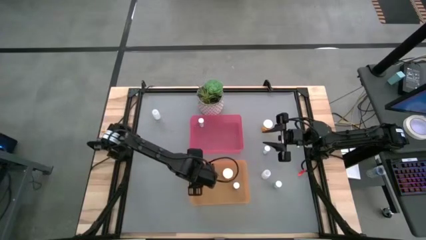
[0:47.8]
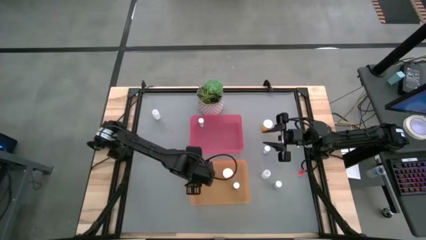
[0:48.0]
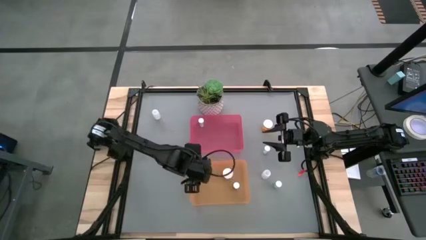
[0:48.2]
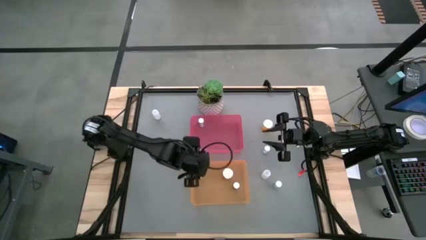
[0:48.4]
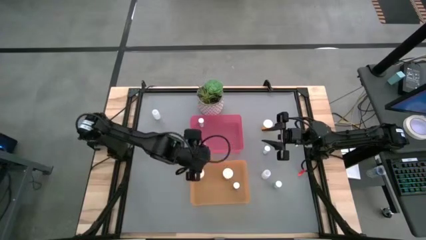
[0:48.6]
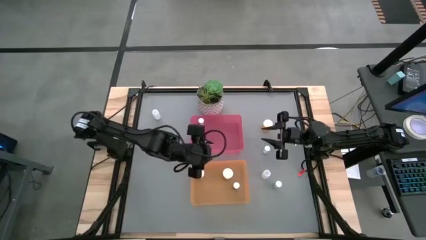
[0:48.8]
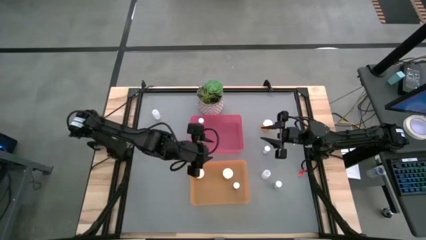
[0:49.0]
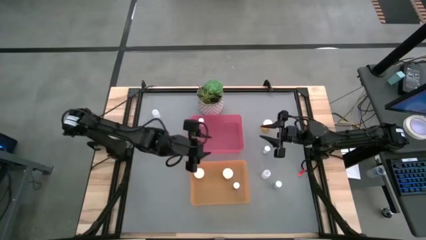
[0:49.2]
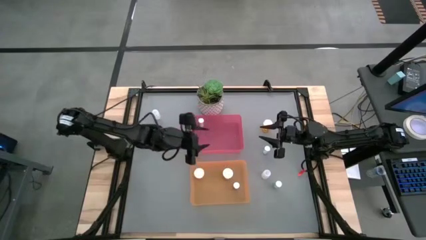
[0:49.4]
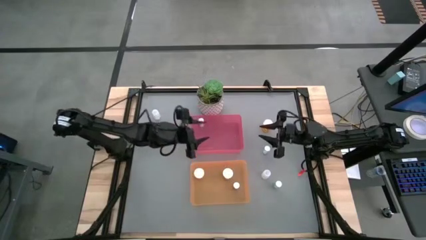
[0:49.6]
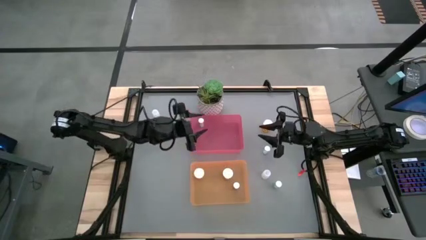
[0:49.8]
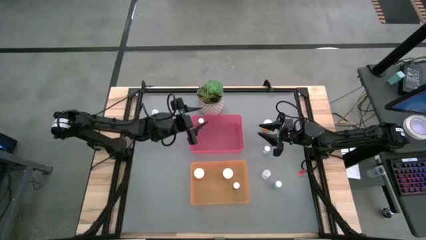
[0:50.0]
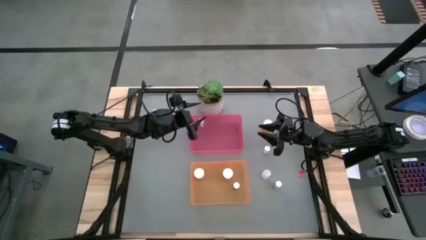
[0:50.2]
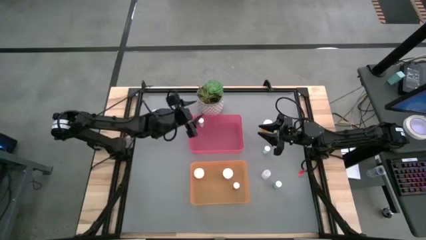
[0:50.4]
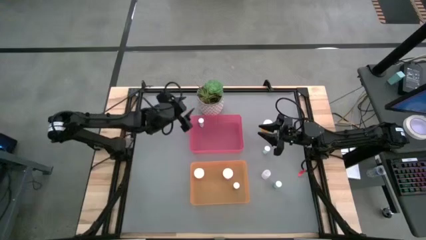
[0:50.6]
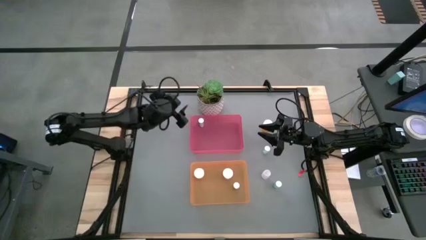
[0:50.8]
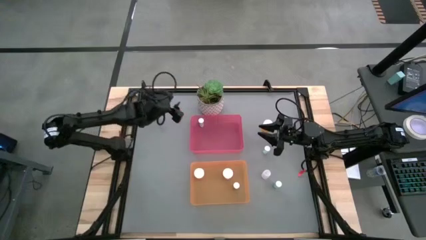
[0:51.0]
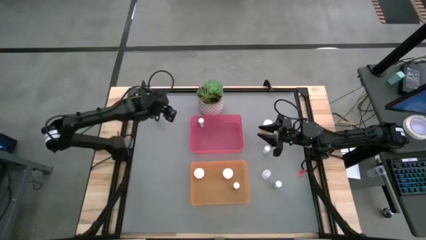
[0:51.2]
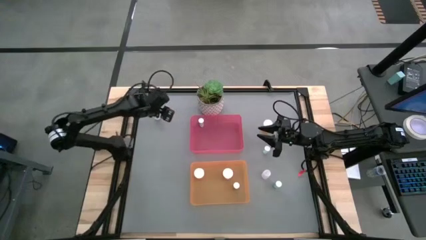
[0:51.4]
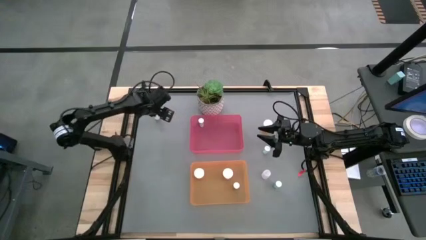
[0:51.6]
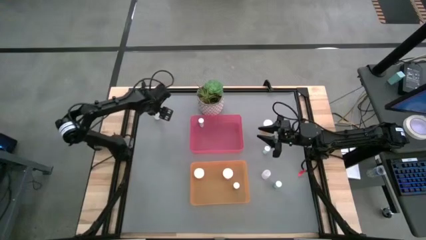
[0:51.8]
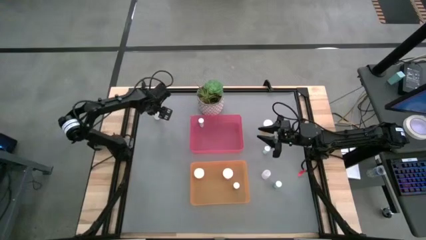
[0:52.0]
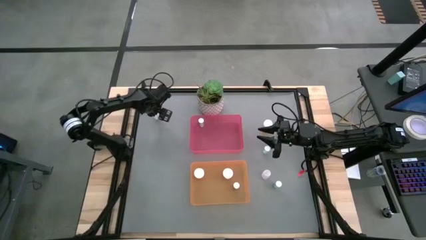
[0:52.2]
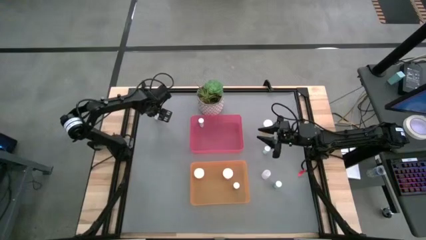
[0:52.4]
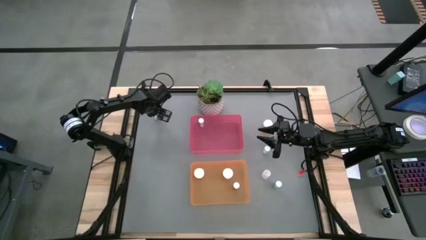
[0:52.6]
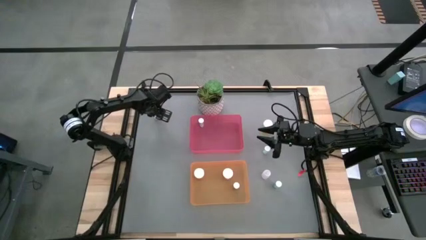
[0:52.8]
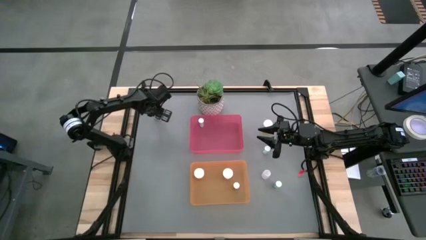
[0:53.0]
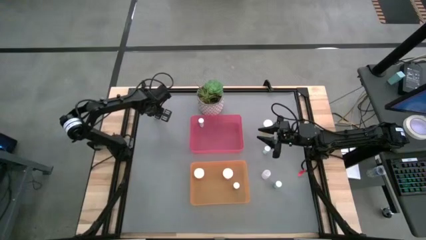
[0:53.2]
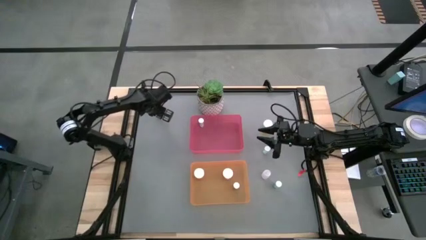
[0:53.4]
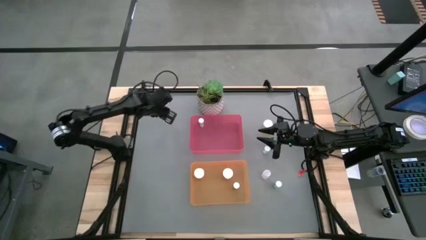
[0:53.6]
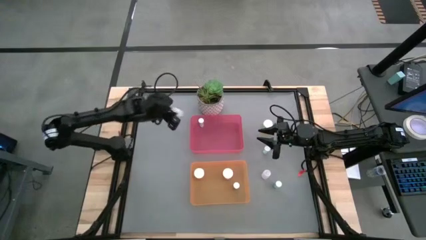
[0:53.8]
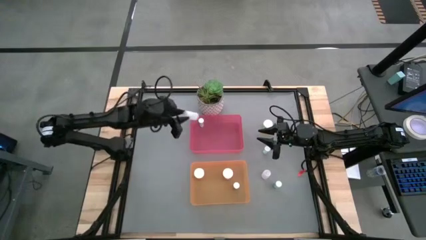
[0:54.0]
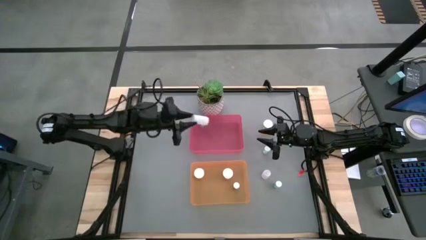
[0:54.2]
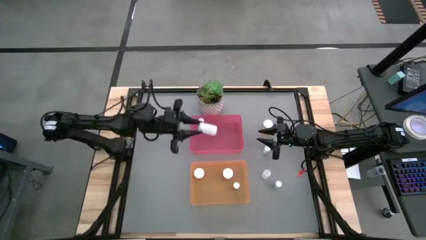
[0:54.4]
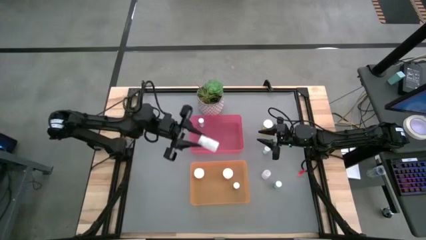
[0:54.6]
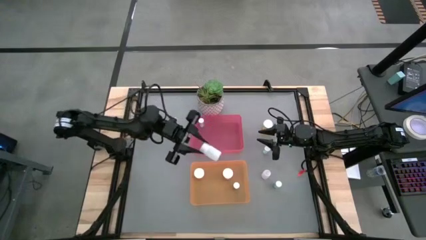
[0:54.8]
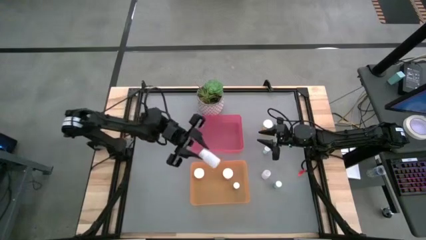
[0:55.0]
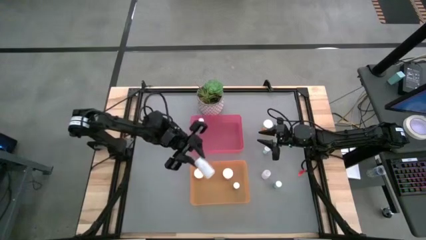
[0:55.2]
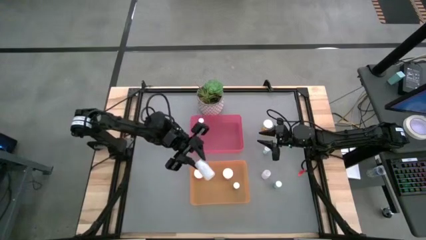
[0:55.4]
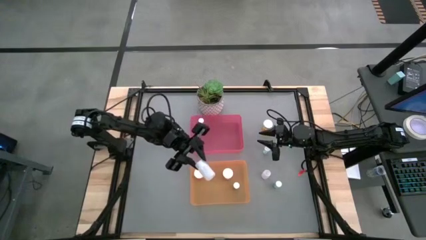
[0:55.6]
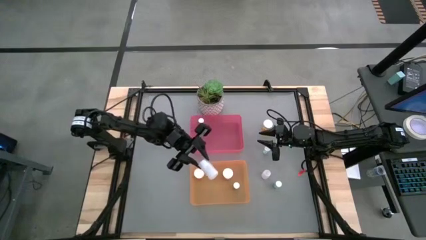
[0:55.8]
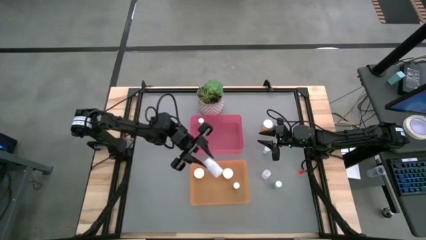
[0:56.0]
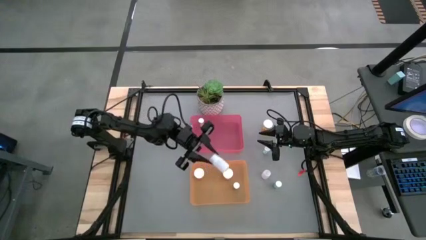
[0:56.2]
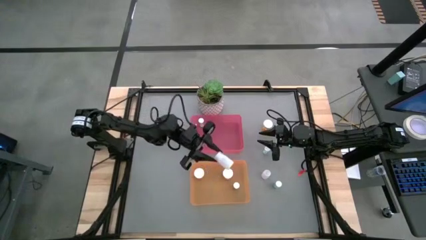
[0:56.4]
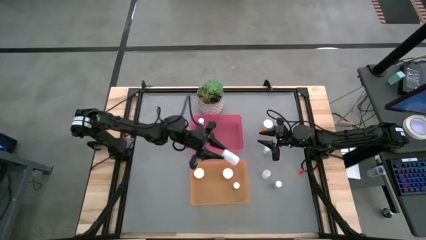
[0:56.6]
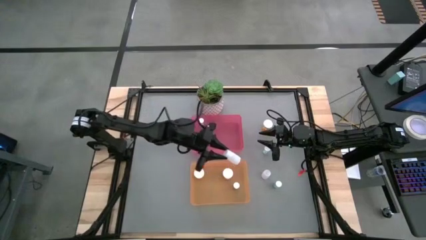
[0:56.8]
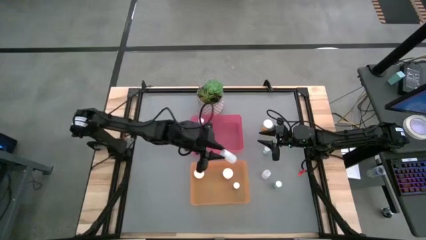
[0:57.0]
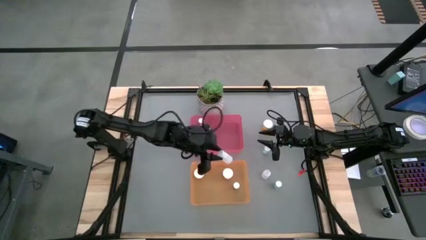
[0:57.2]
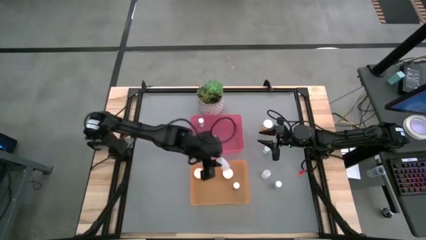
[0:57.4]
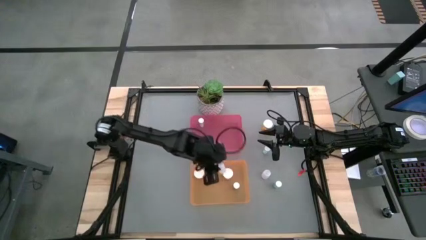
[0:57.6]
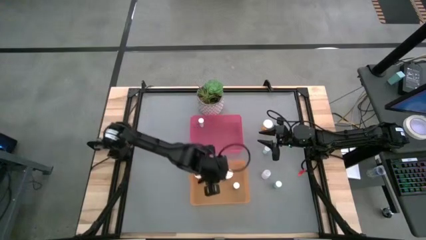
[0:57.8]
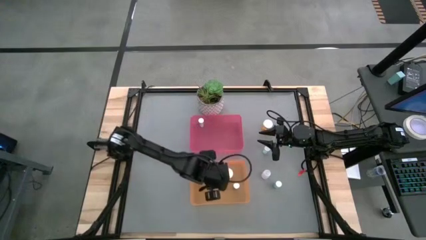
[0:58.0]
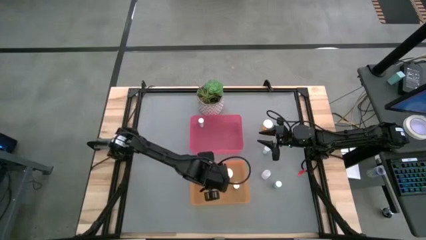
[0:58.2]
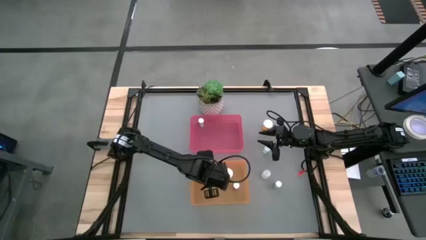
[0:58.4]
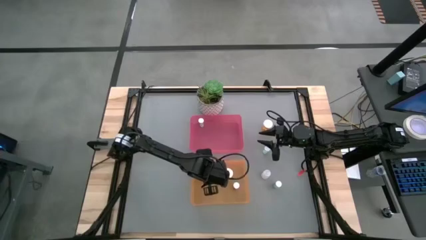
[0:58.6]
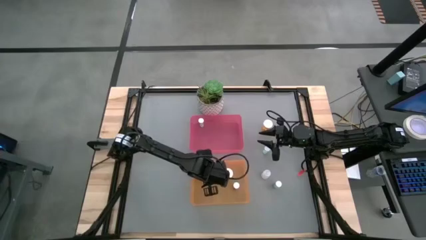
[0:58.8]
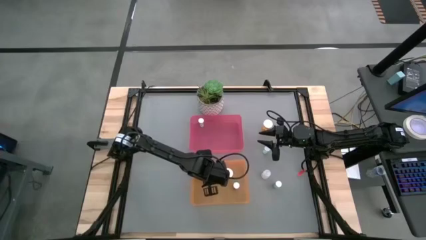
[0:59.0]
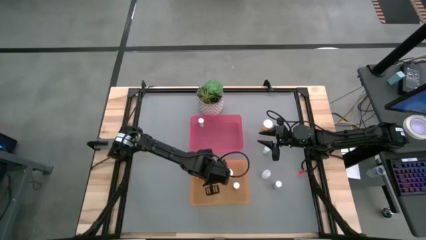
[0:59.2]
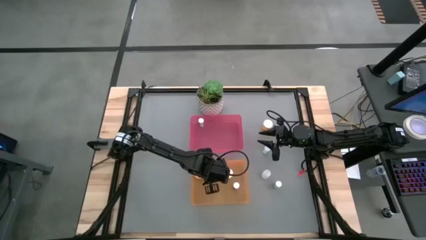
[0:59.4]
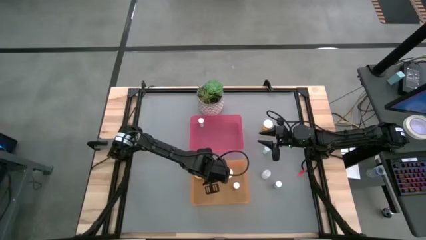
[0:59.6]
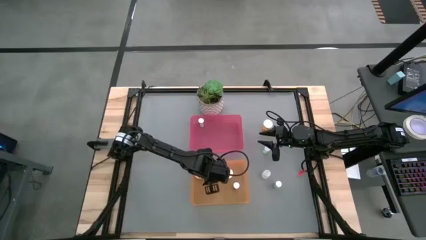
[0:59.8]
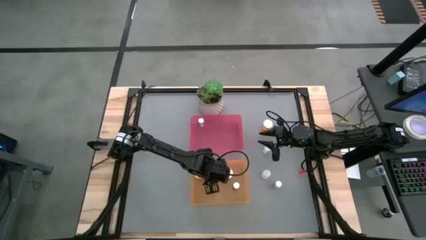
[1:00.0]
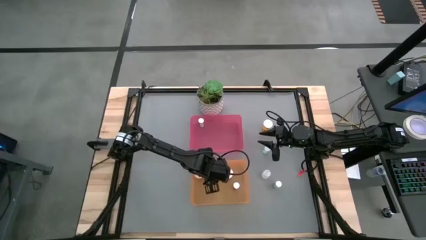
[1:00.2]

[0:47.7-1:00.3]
Task: Pick and place medicine bottles into bin by pill shape (circle, oval)
Put the white capsule bottle into the orange bin

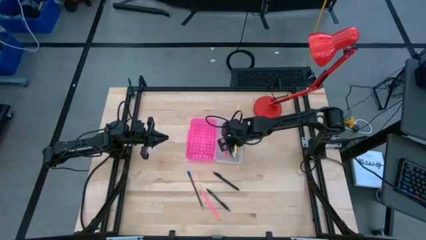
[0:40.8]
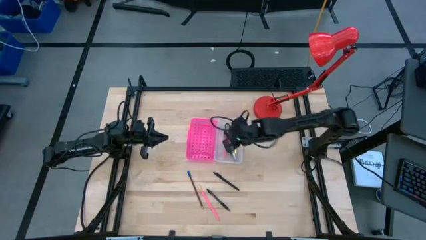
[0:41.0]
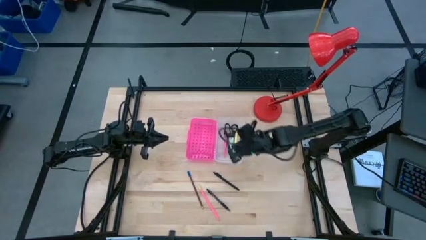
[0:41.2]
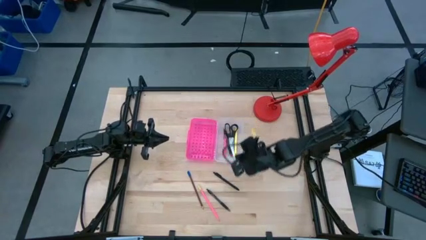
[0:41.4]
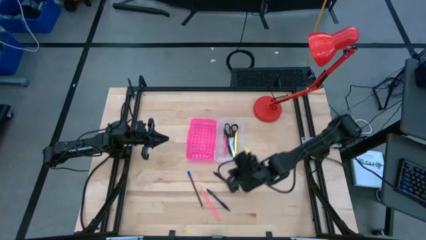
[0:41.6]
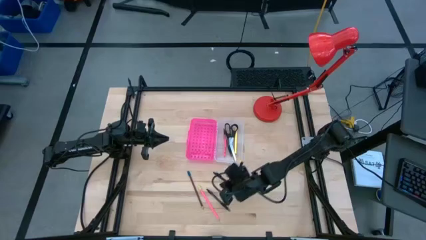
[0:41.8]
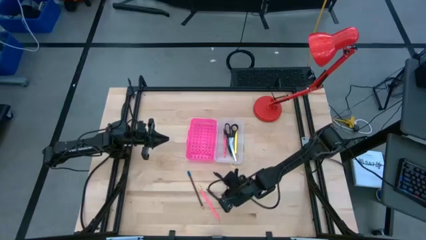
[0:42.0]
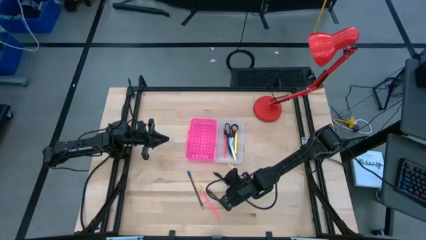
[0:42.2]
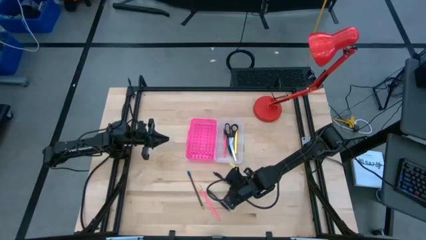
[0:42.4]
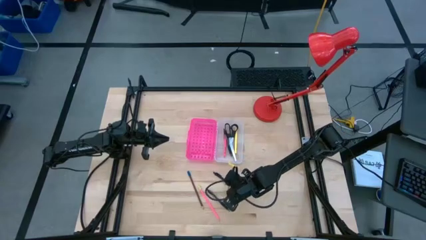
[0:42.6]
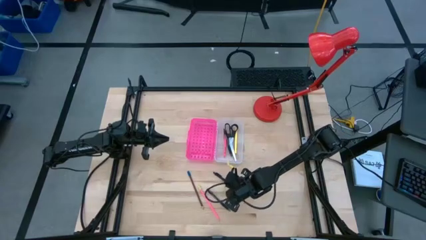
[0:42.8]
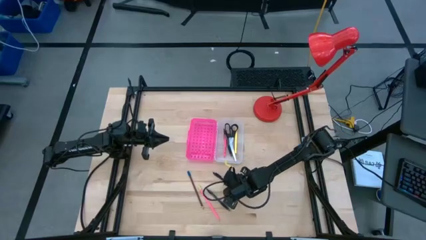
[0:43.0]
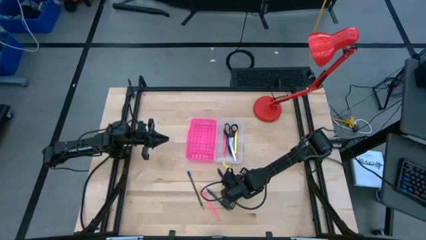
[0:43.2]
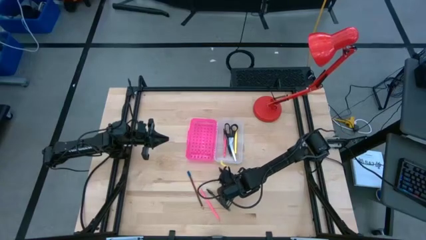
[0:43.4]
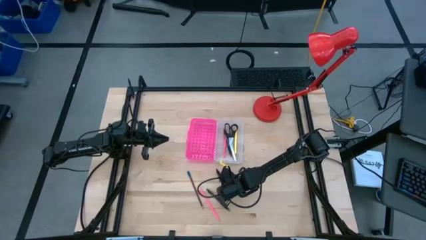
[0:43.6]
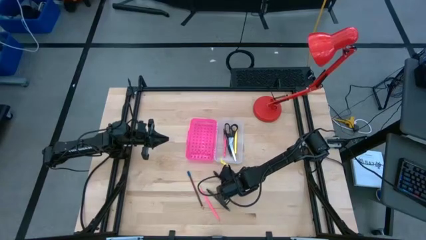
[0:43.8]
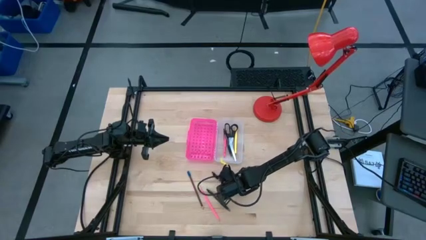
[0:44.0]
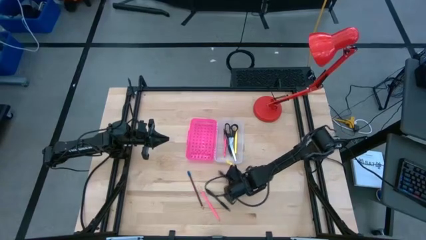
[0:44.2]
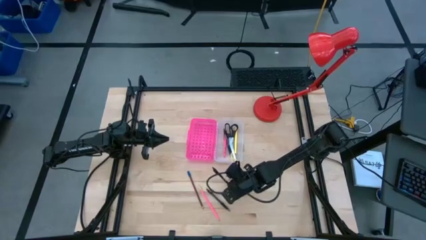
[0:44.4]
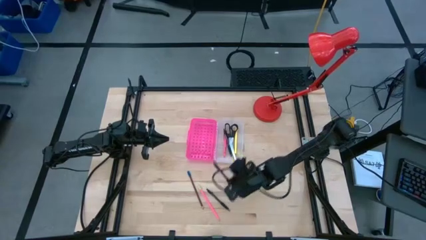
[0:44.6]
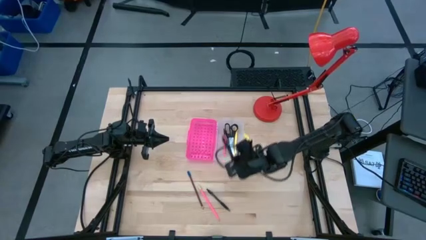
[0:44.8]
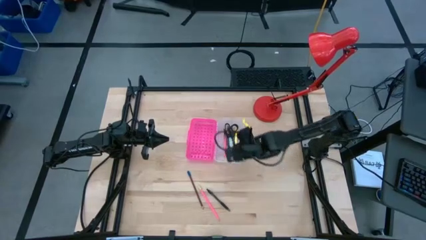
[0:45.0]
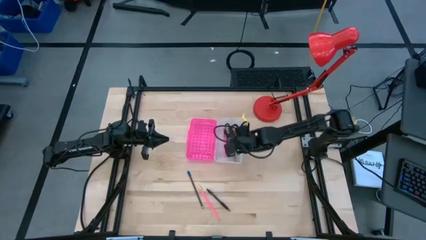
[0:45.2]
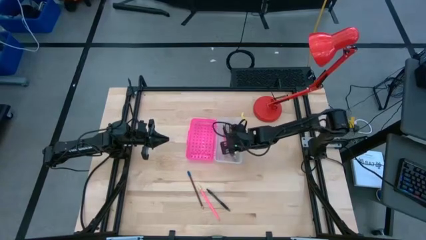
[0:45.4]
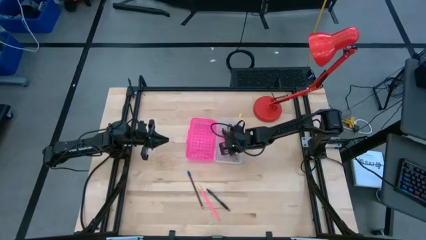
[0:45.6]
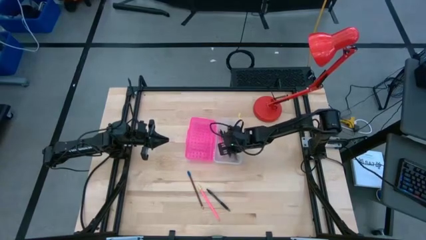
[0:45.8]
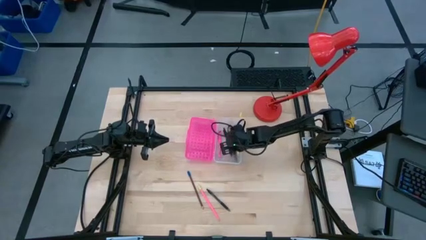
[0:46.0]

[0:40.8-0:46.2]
Task: Pick & place school supplies into a supply box
Put the top black pen into the supply box
